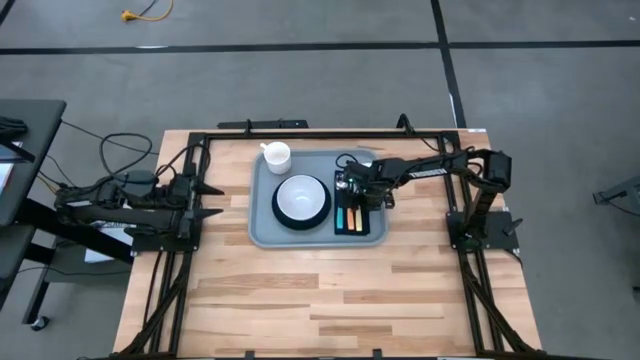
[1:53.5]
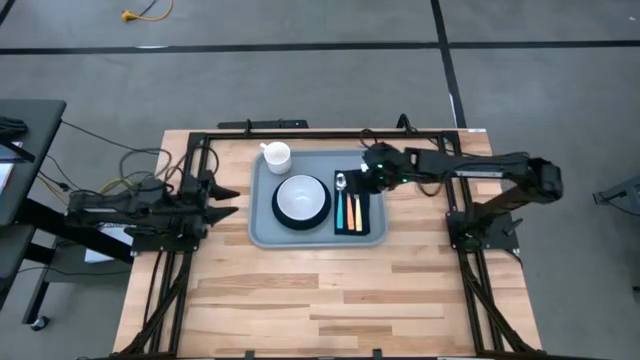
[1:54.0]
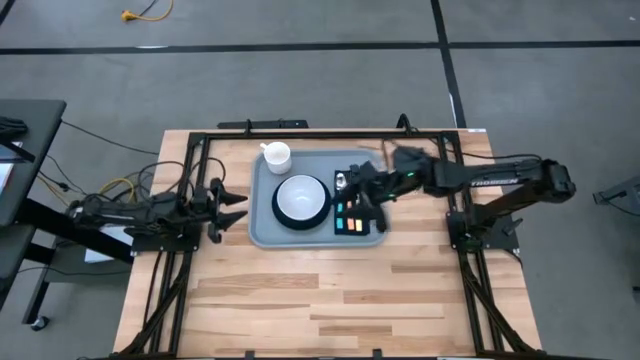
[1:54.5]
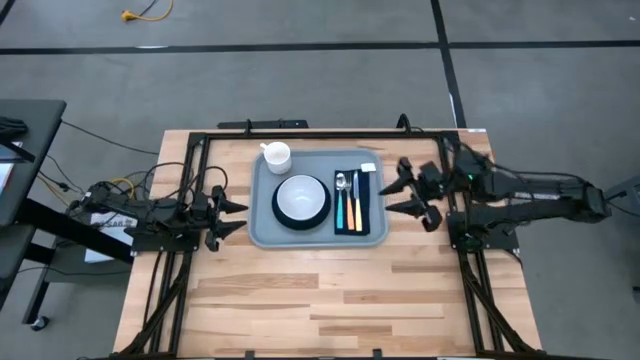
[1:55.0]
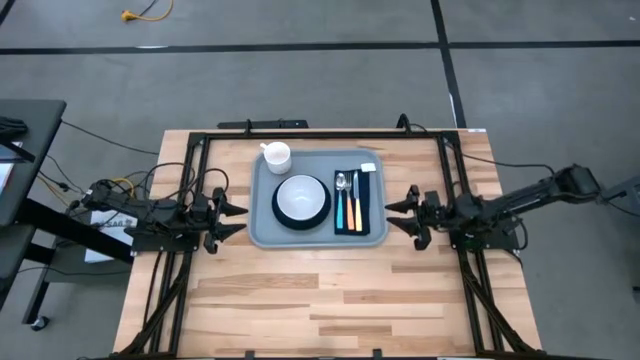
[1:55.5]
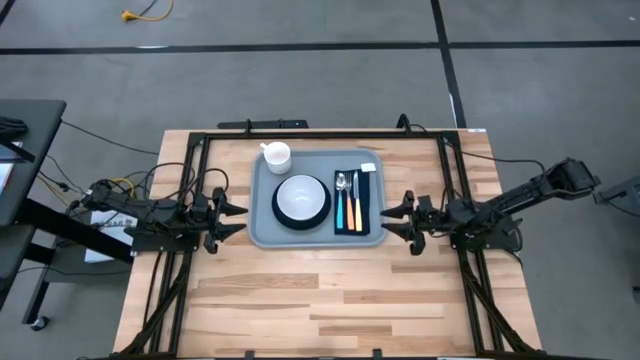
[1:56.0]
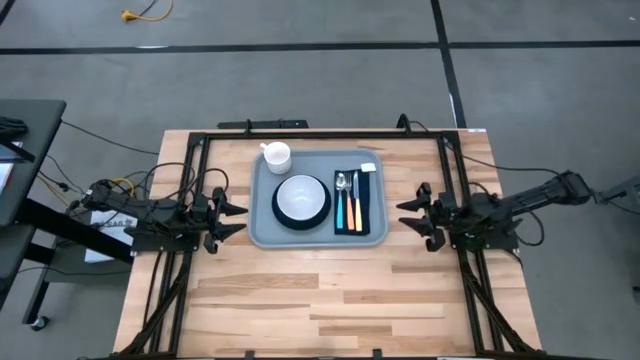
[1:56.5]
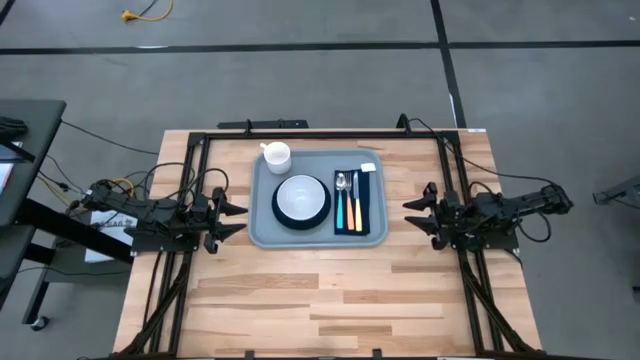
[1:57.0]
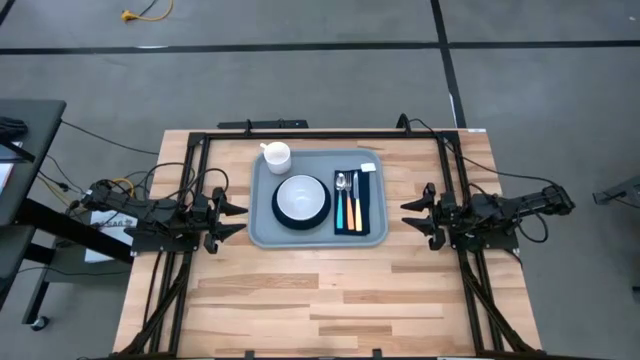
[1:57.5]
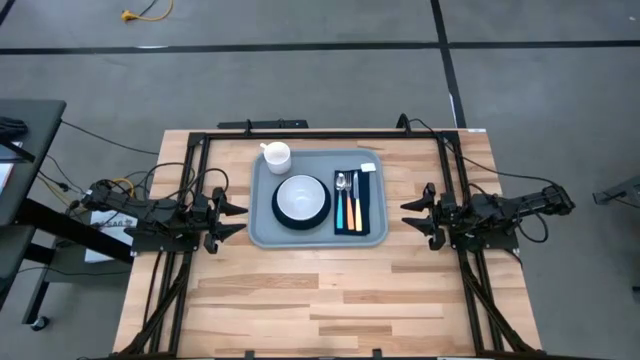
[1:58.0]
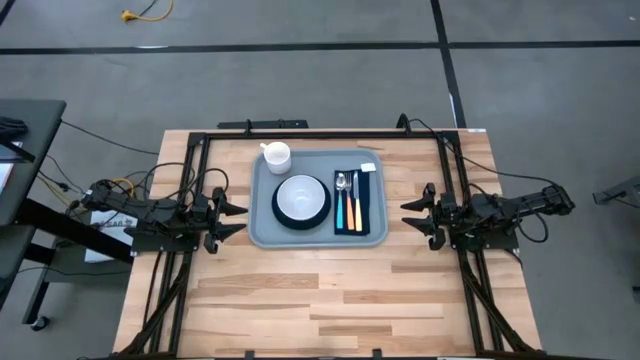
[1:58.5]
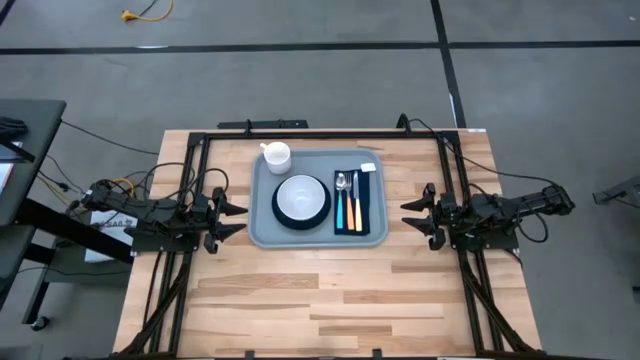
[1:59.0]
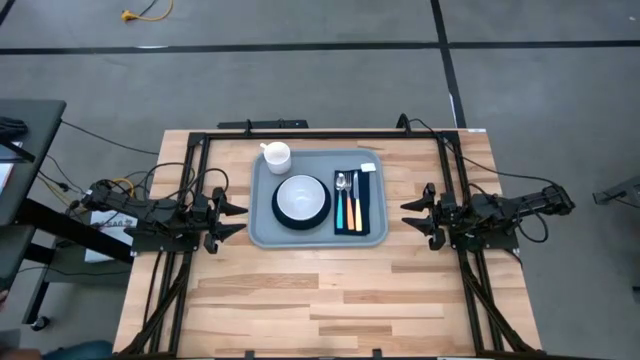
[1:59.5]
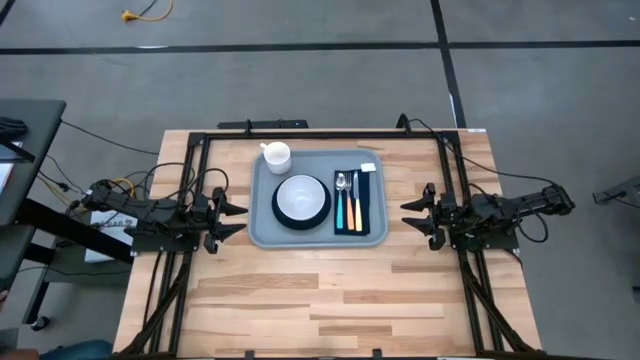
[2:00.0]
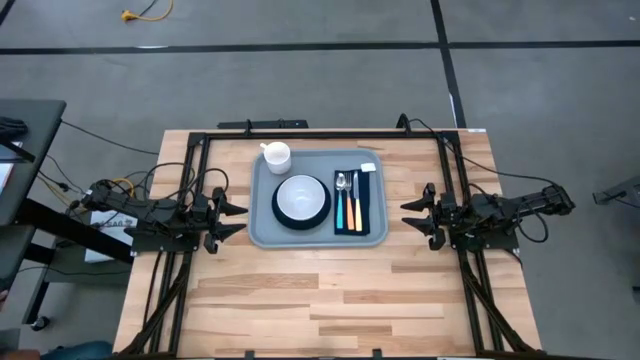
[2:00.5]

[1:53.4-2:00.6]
Task: Set up tray
Return to Home Position

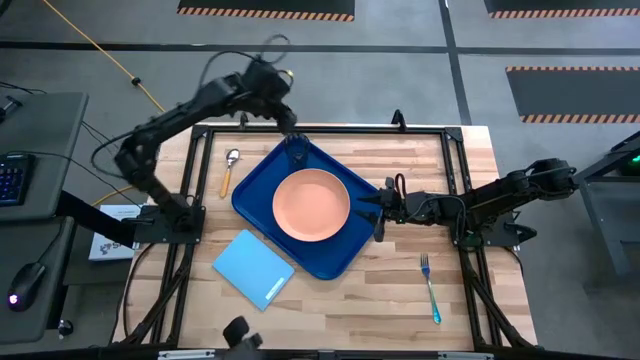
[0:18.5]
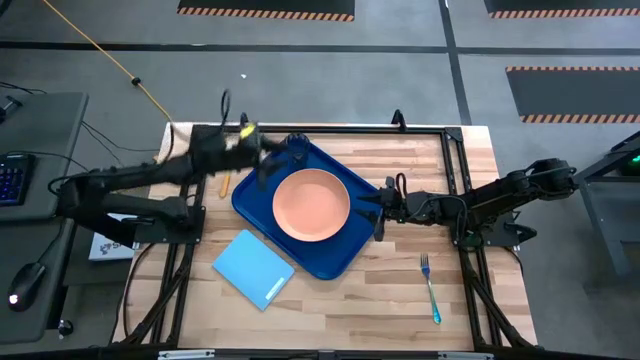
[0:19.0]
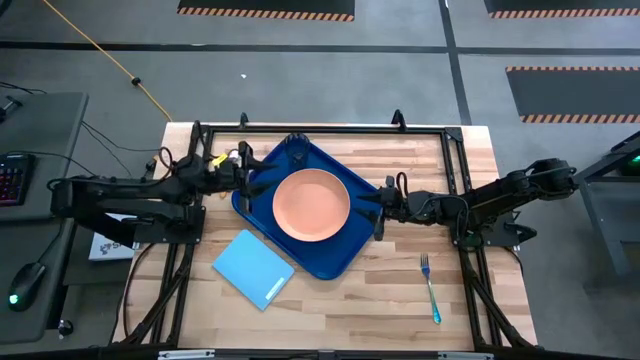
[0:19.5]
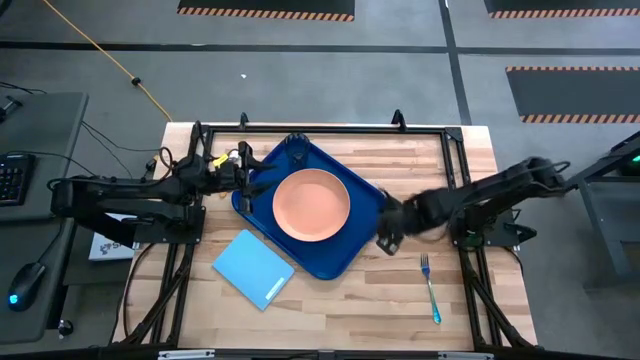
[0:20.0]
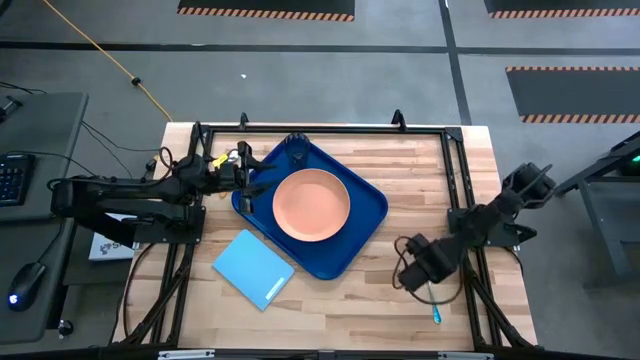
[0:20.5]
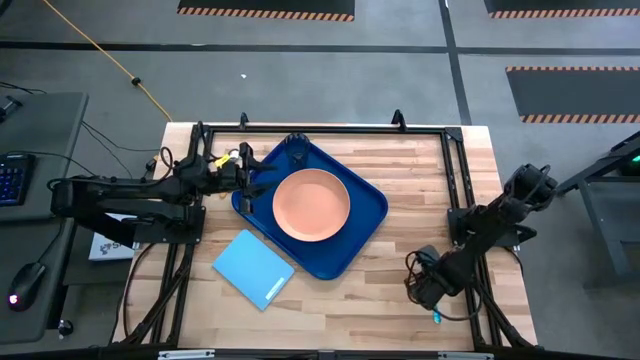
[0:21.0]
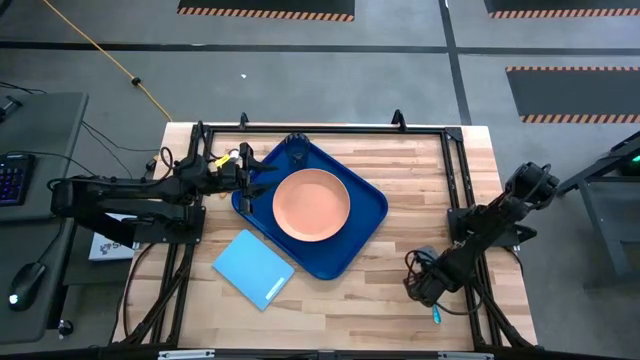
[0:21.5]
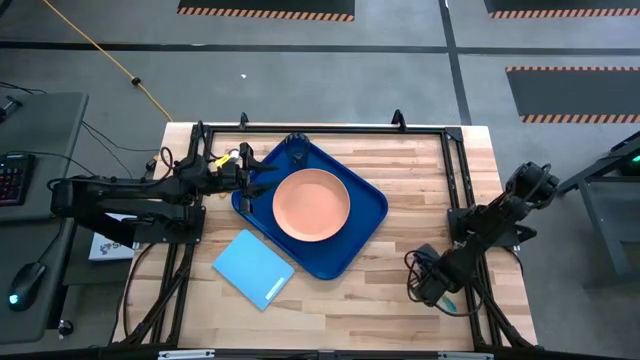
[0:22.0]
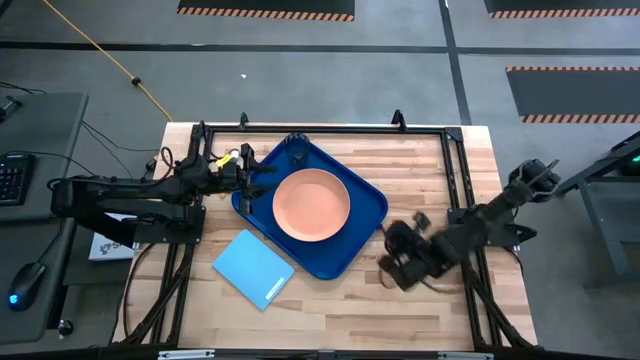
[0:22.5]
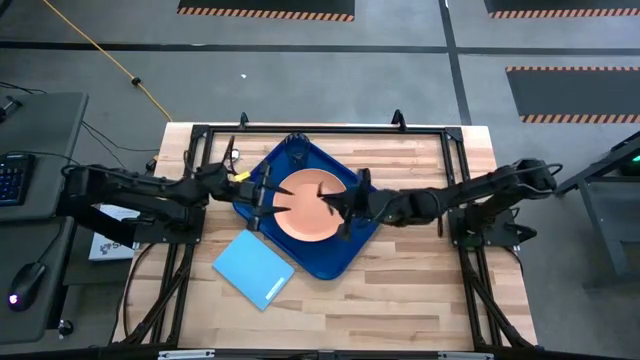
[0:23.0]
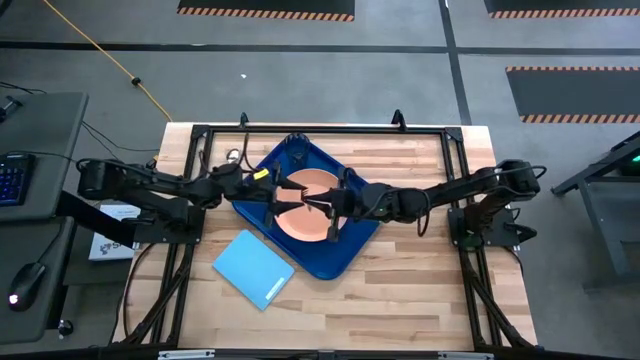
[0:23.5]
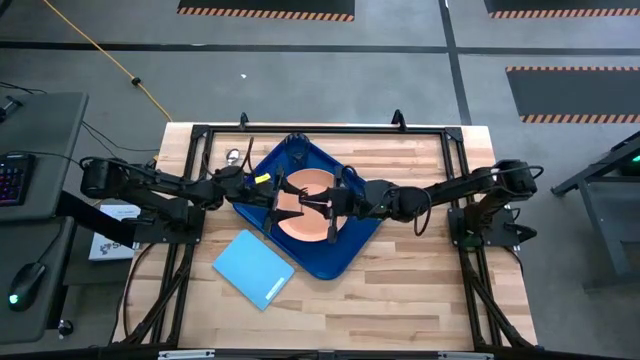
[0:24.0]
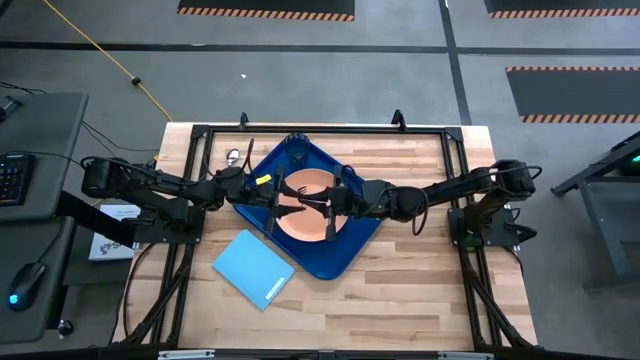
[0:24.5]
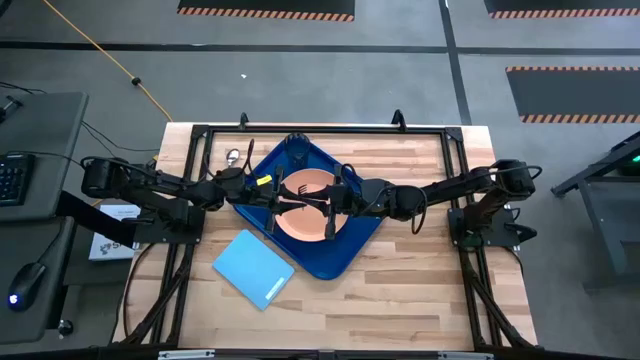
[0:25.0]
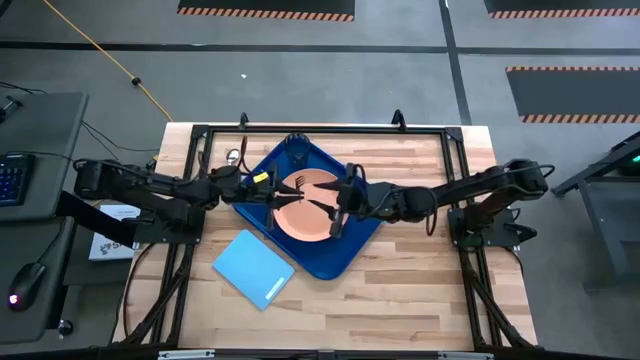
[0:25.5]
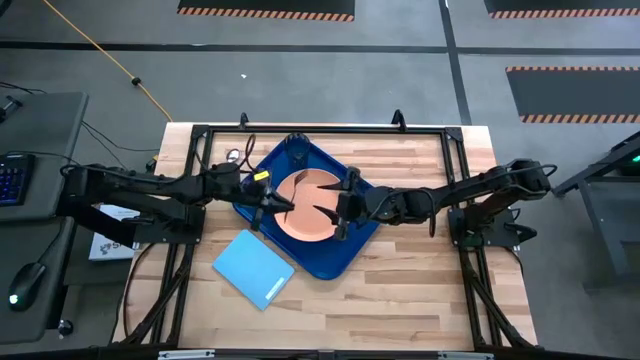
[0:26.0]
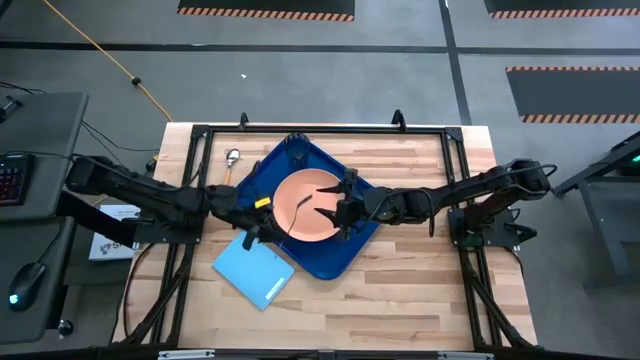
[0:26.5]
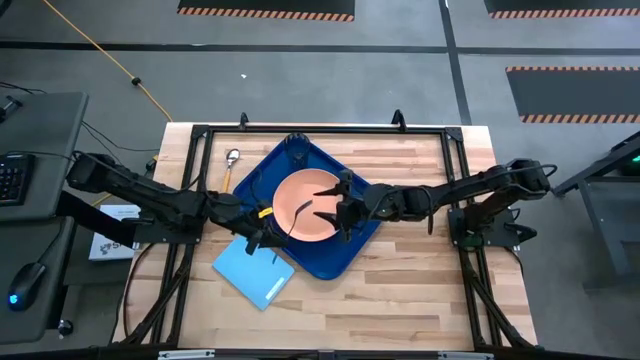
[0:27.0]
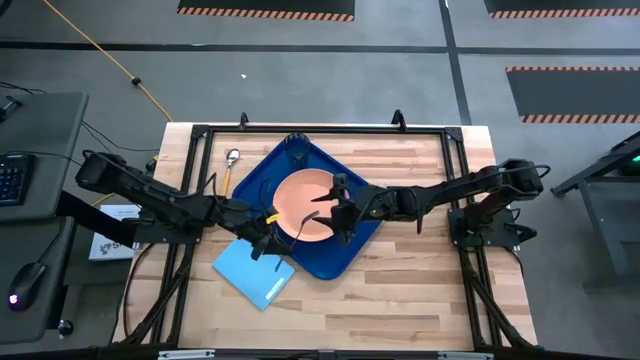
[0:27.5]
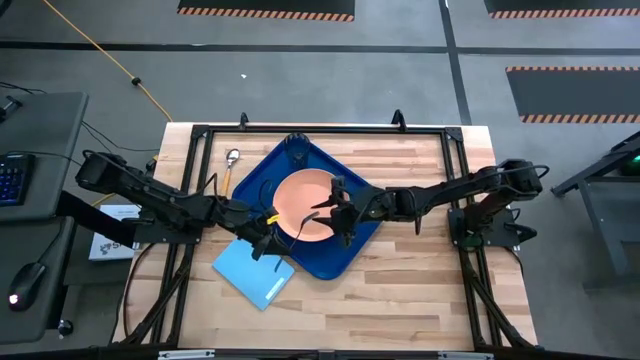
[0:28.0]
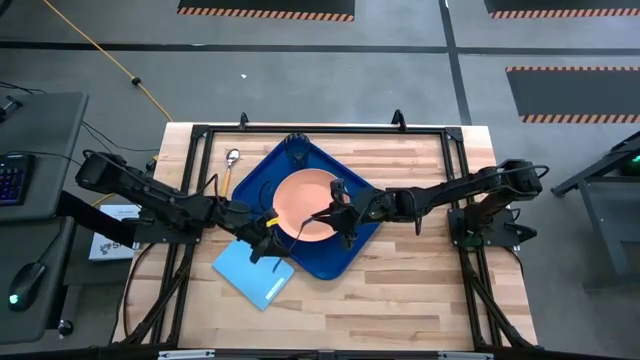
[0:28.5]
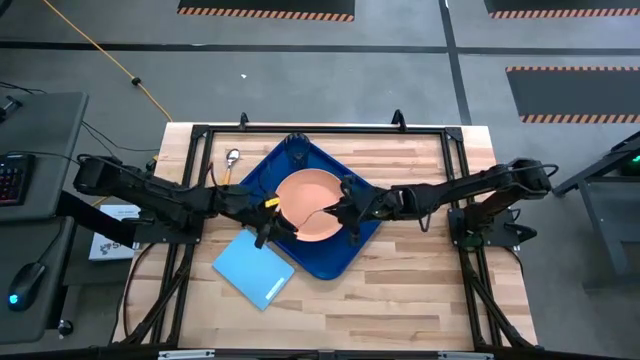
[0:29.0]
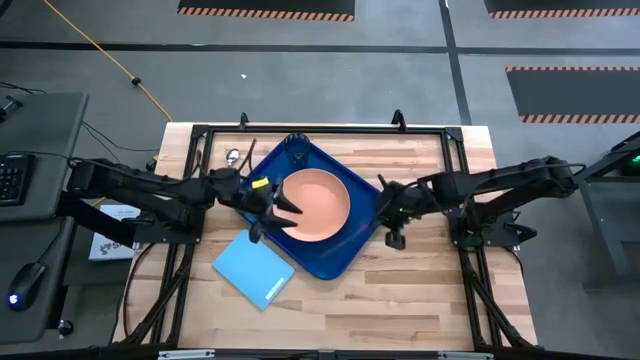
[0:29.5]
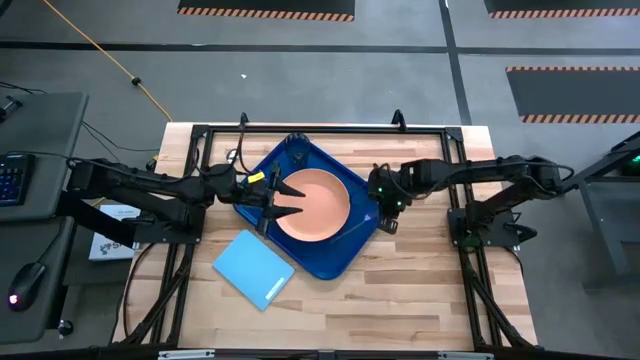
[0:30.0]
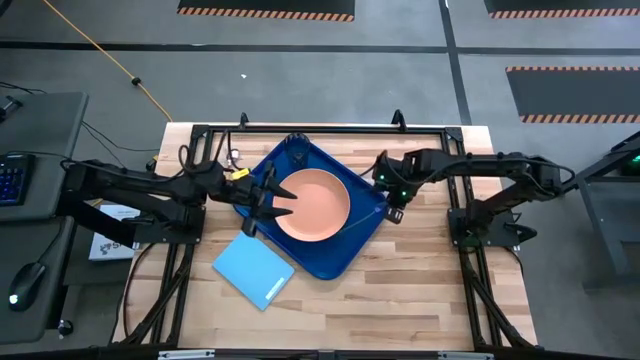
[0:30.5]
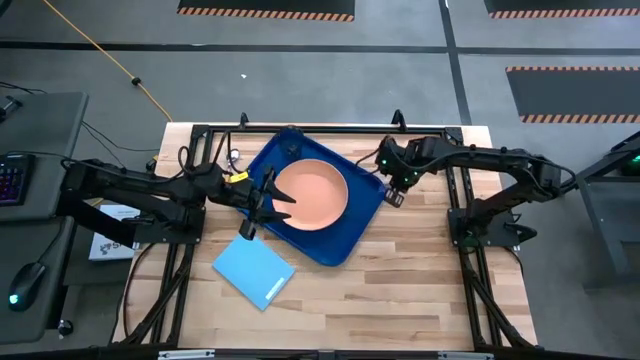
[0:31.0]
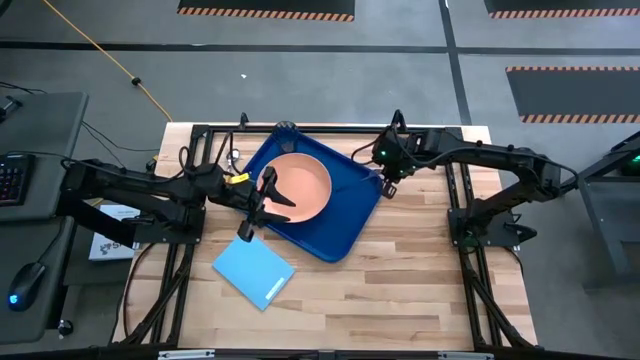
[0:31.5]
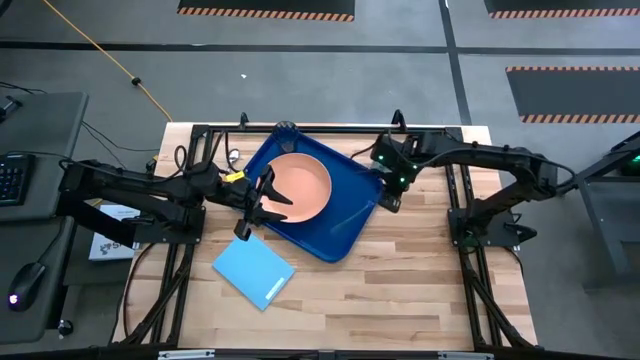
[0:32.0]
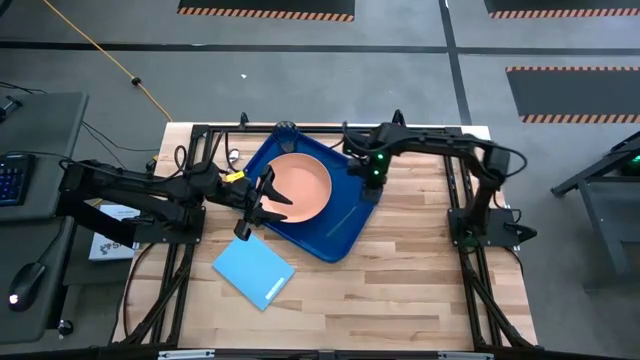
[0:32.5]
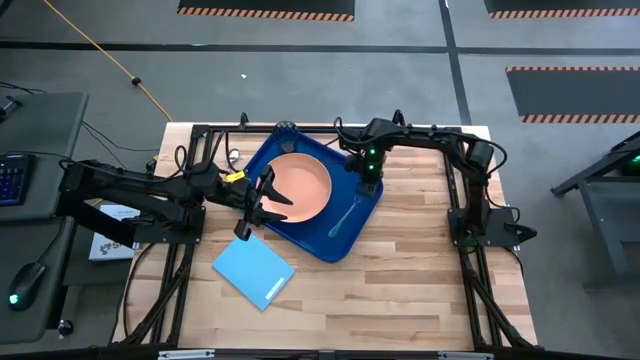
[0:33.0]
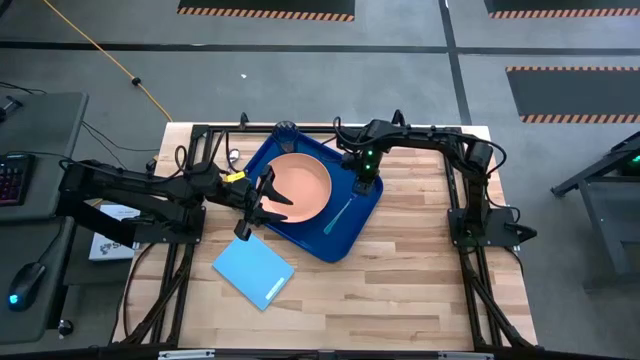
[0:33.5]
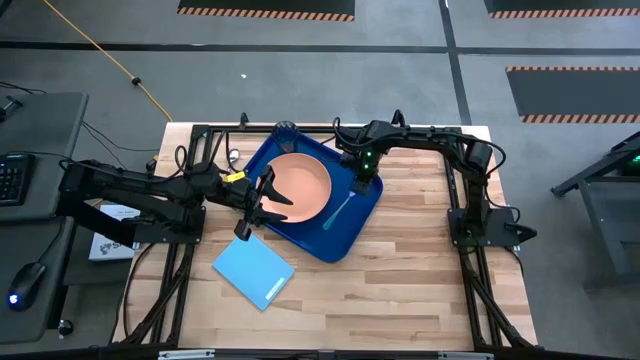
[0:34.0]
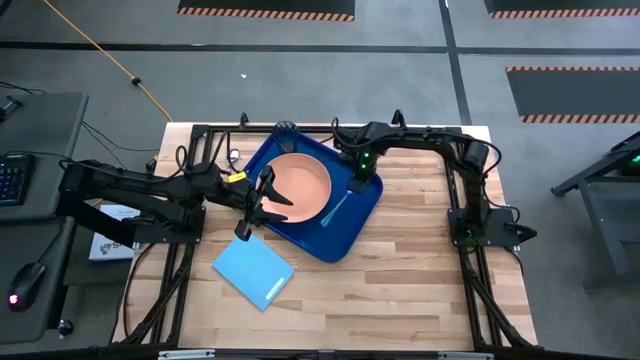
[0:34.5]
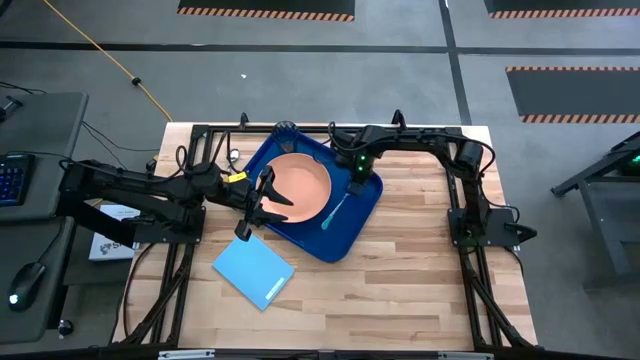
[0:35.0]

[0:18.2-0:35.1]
Task: Pick and place plate/cup/fork/spoon on tray
Put the blue fork on the blue serving tray to the right of the light orange plate
